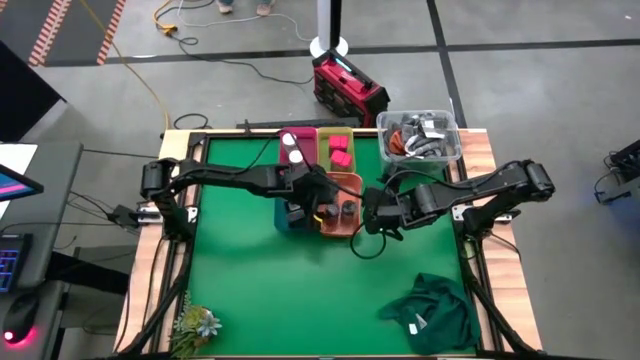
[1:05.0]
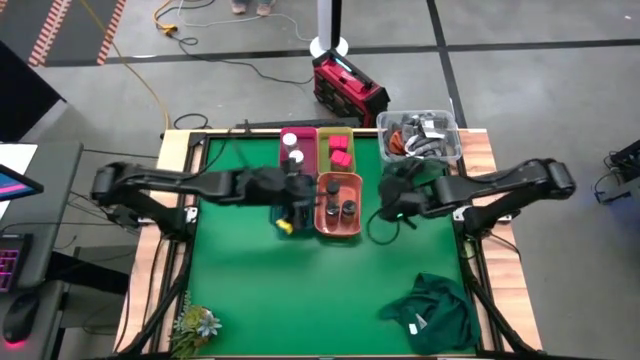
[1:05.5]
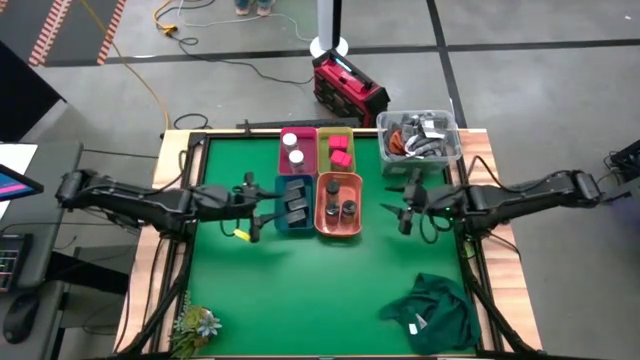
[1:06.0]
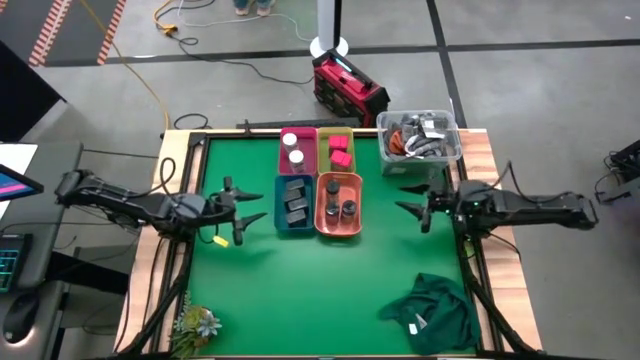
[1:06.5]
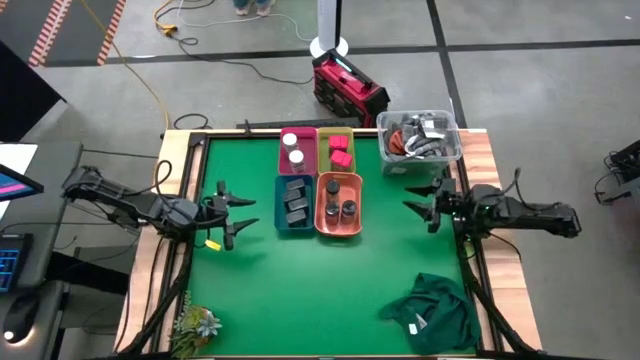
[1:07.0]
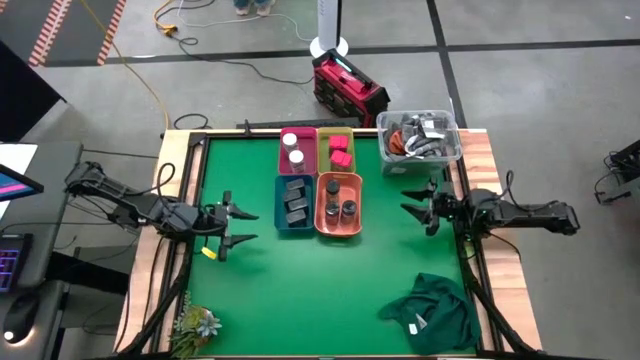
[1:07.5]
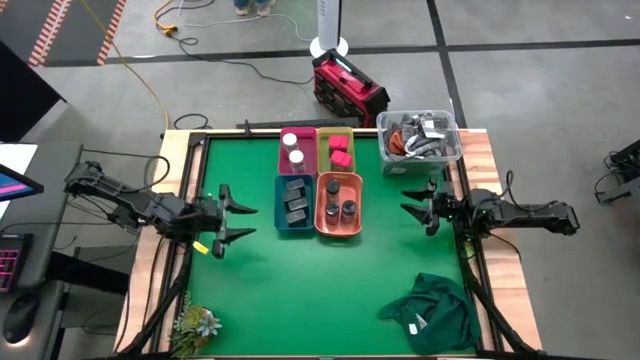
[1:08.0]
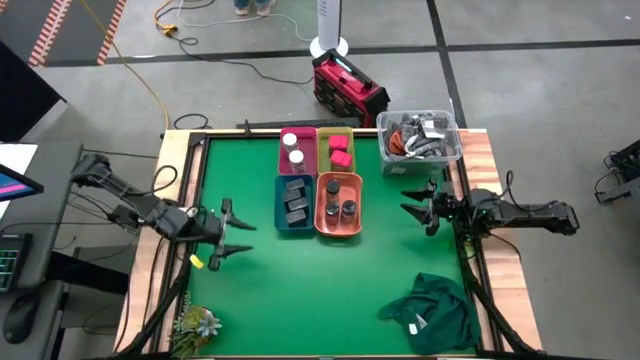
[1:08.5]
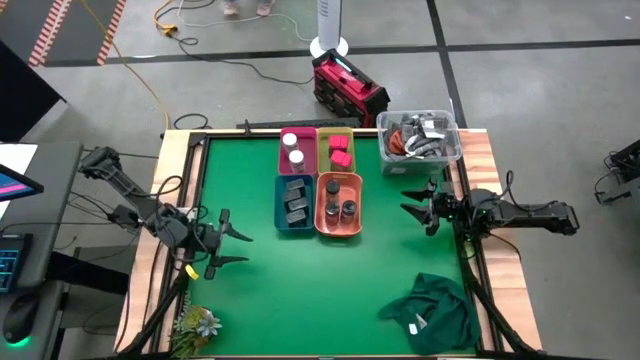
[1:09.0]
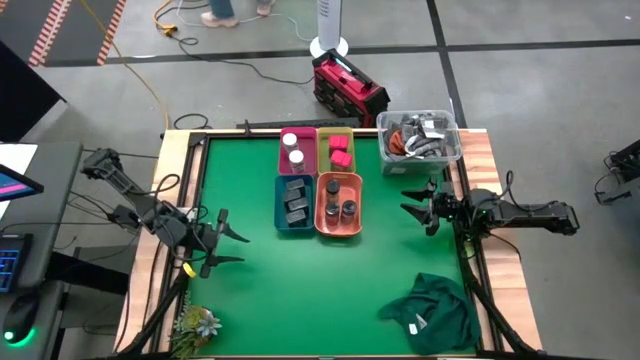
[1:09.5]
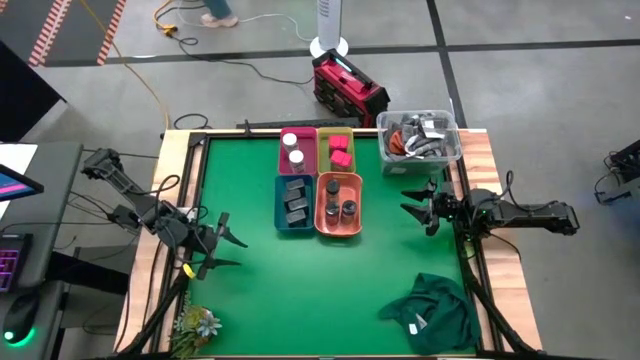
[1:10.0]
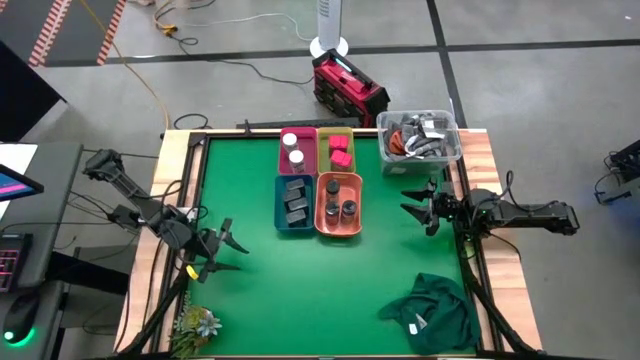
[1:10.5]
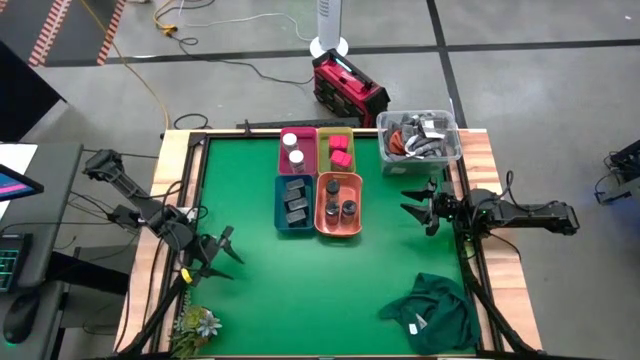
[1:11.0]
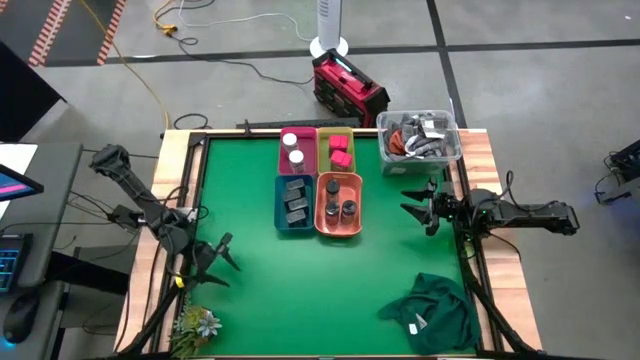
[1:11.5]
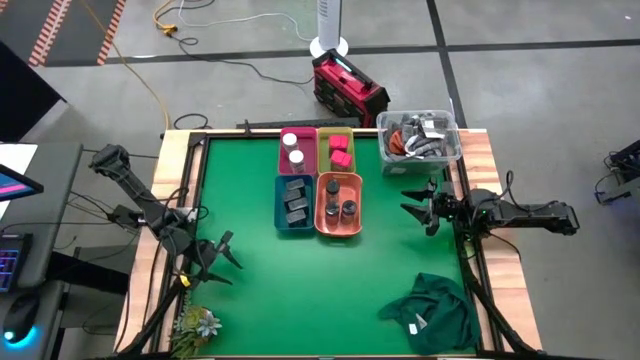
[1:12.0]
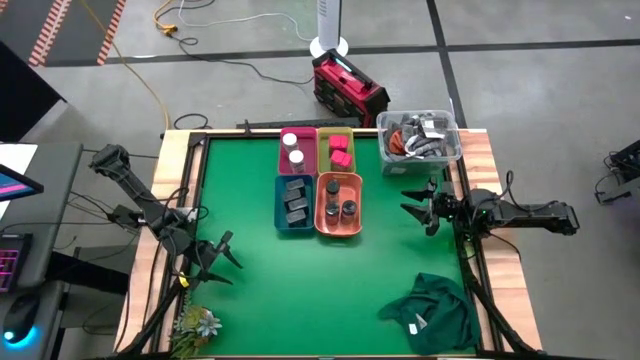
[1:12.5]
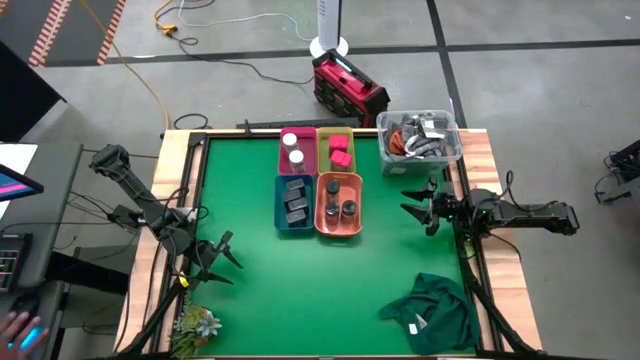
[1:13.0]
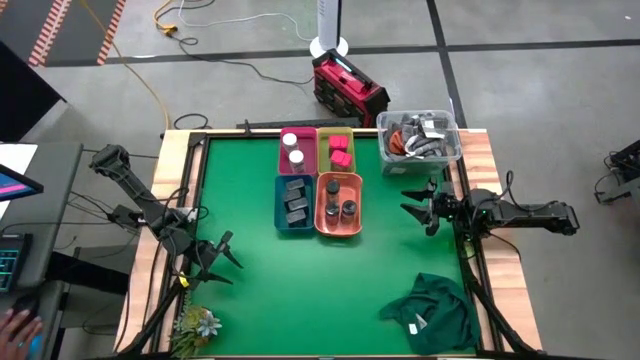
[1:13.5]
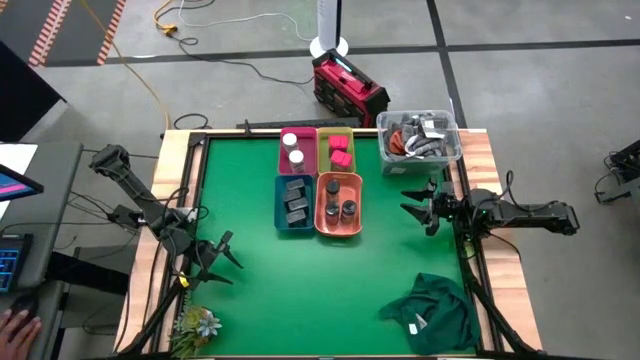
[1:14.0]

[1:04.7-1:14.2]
Task: Sort spices by type
Return to Home Position

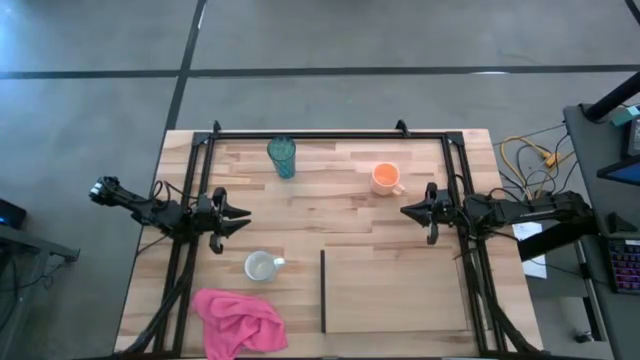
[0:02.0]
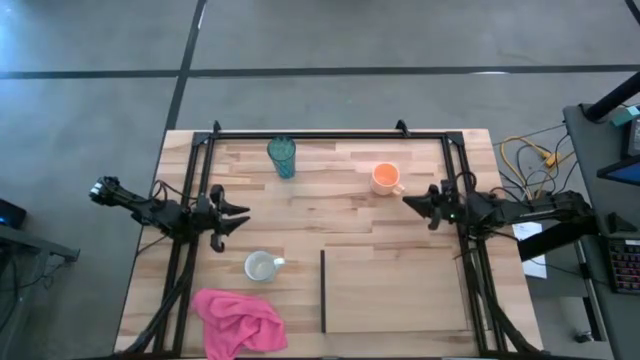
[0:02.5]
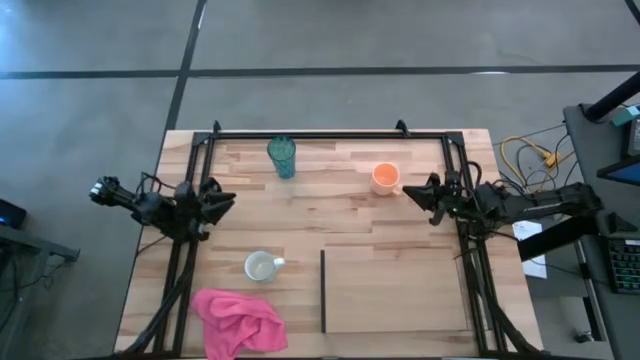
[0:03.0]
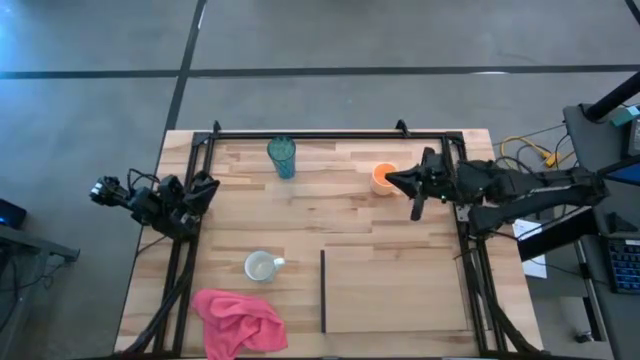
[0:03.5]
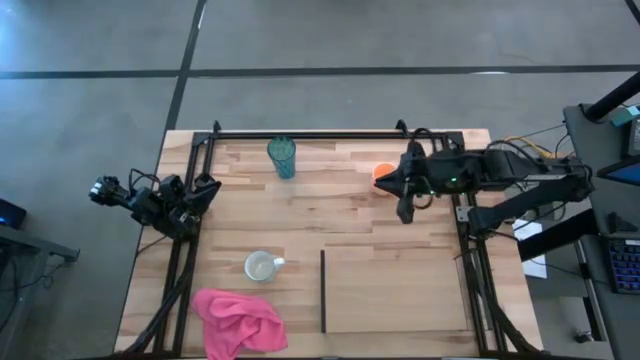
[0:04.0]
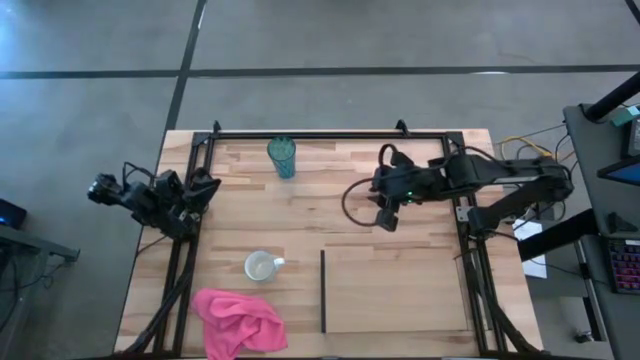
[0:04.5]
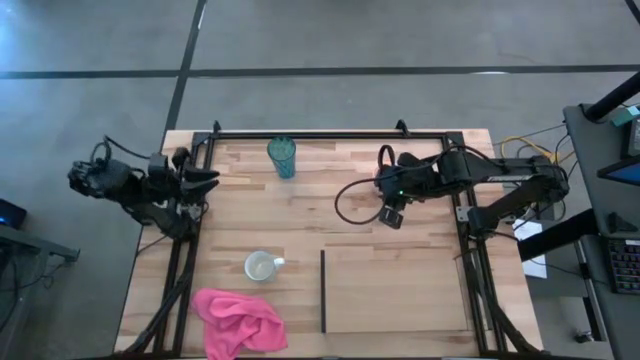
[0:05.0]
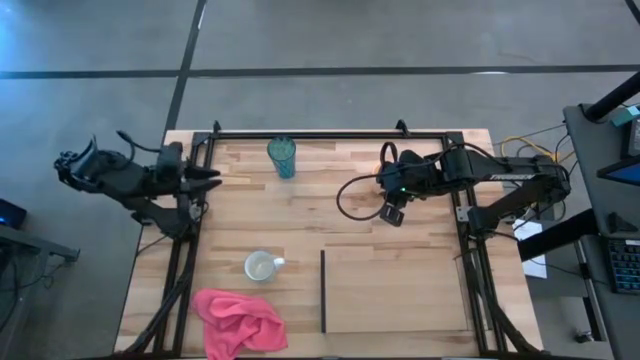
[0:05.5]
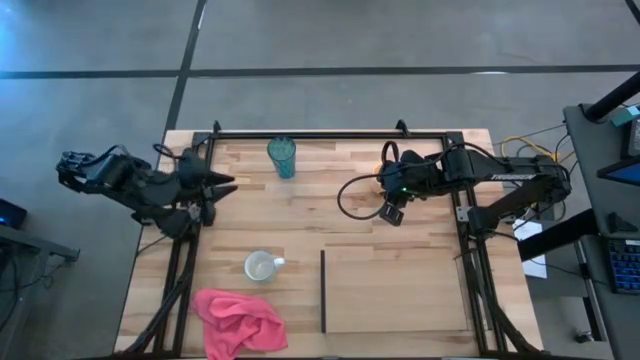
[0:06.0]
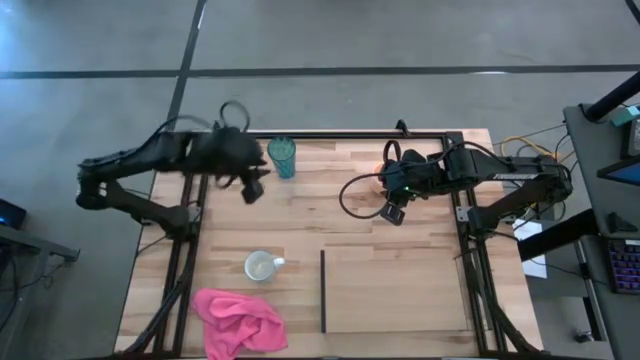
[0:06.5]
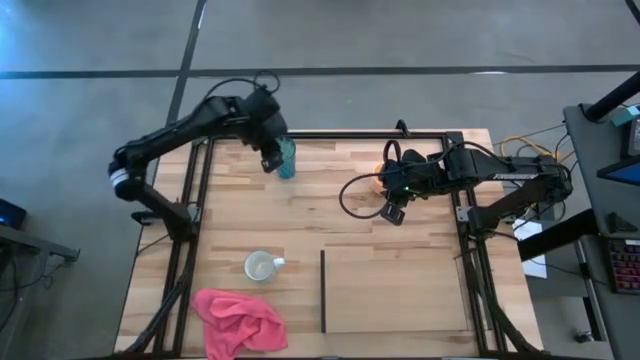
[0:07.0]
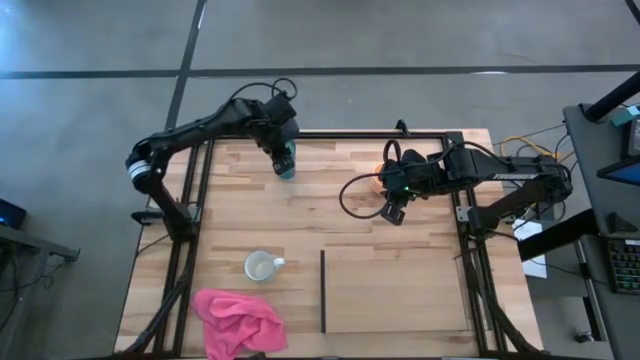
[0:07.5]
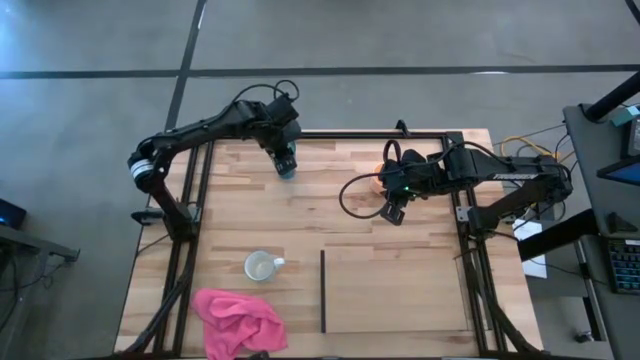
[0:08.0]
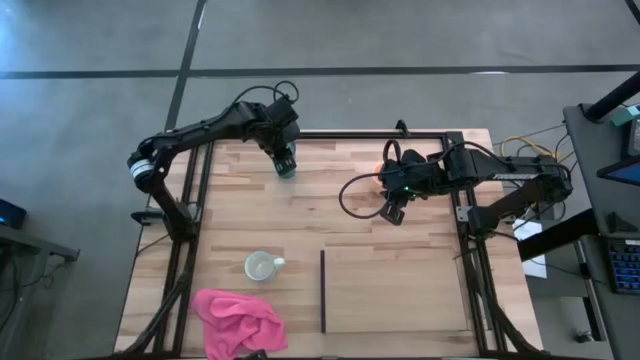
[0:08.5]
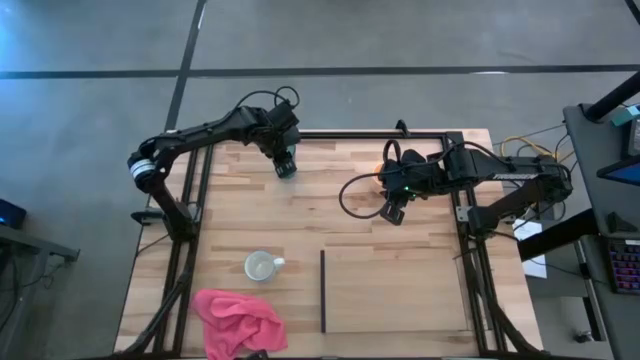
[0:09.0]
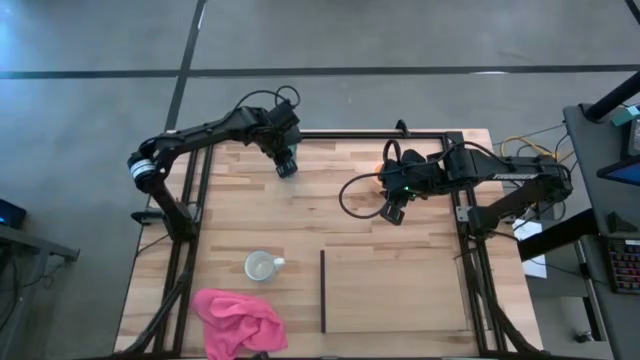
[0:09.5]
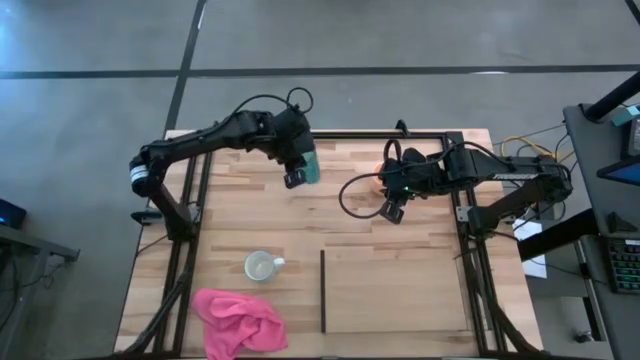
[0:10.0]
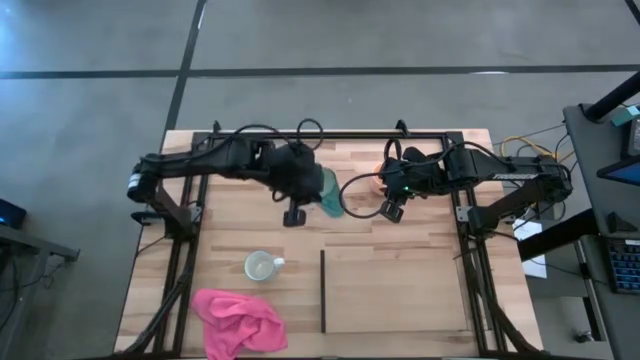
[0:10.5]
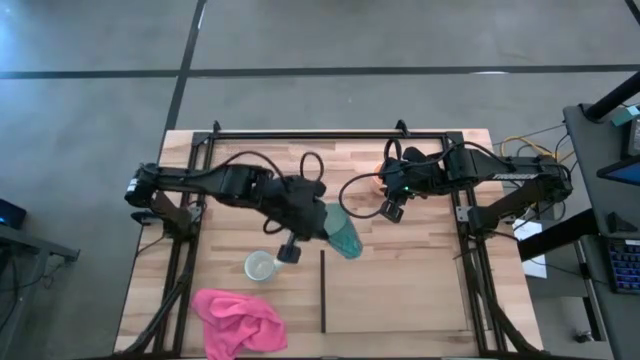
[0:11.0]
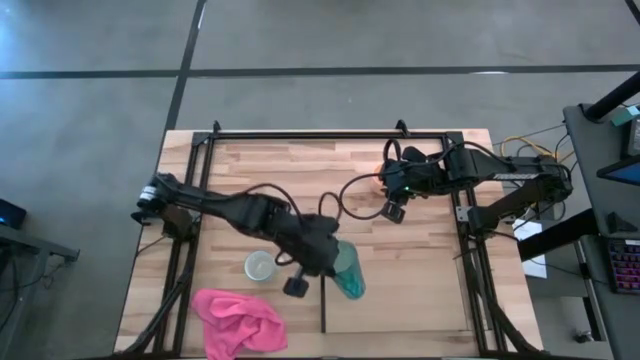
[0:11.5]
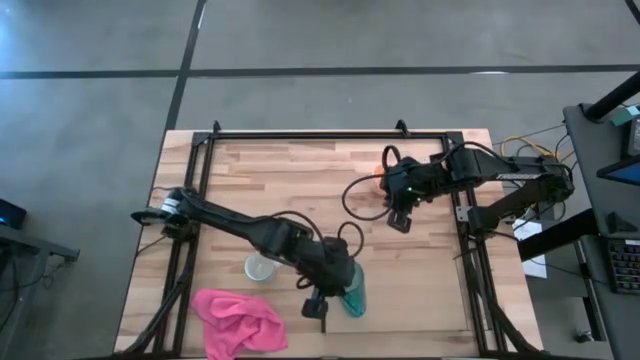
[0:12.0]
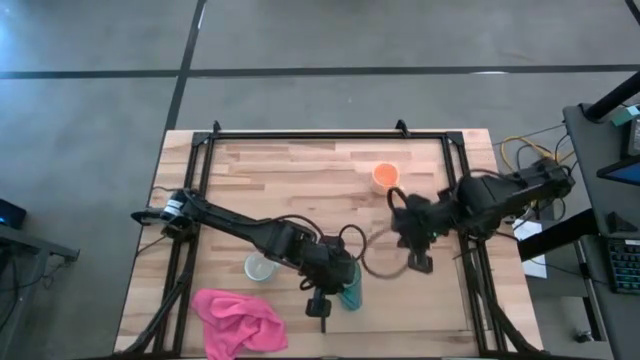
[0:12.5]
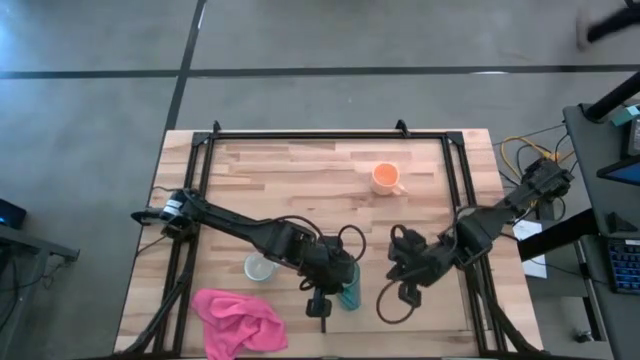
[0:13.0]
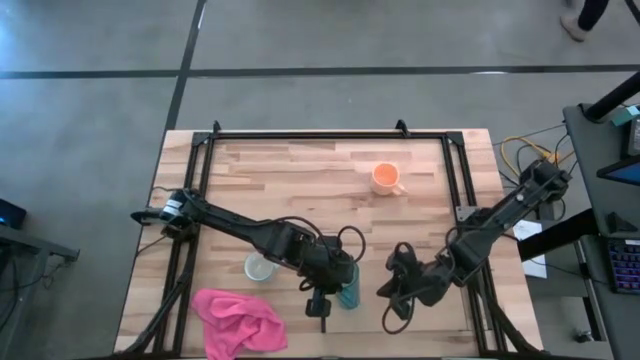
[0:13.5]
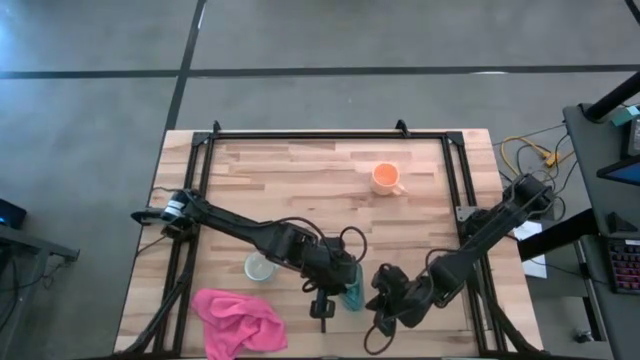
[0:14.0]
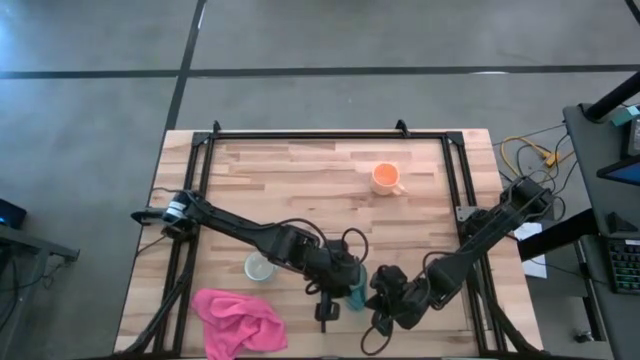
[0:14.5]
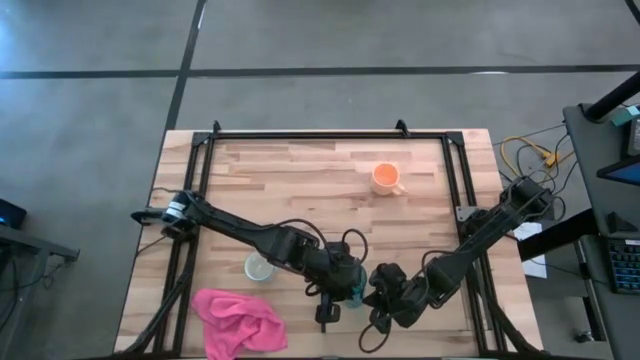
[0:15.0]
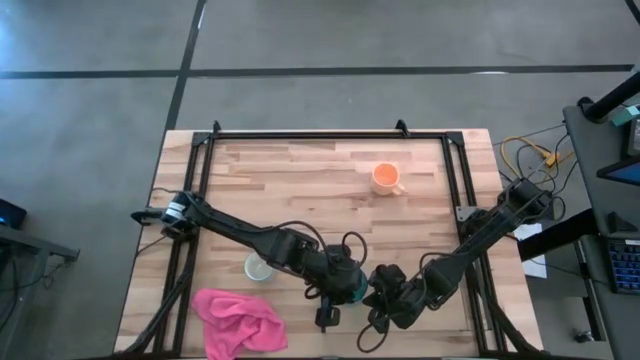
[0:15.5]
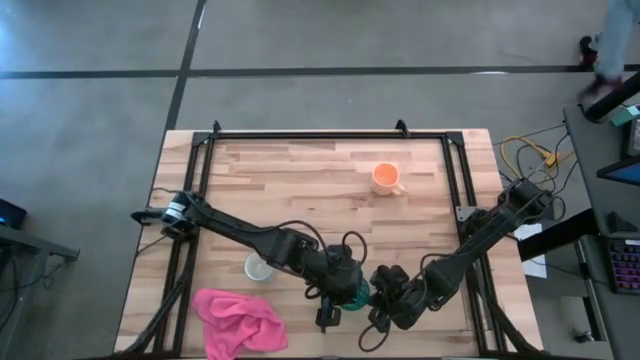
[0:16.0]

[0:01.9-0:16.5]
Task: Stack small to large cups/mugs on shelf
Put the blue cup on the shelf
